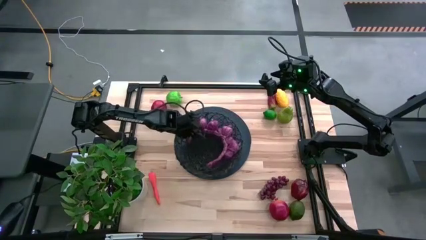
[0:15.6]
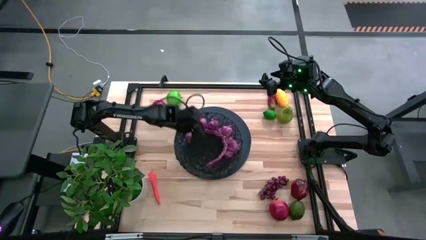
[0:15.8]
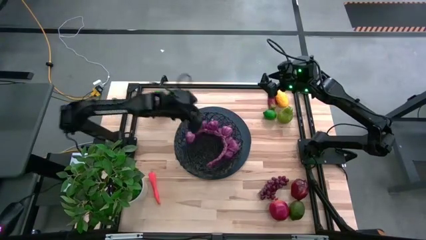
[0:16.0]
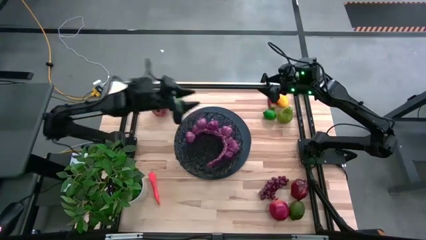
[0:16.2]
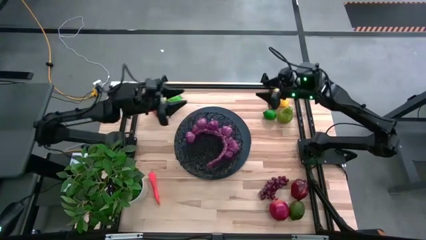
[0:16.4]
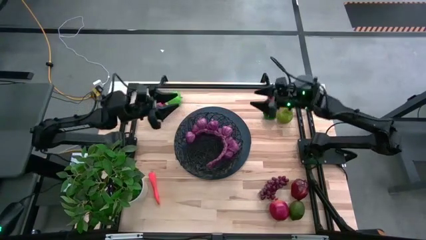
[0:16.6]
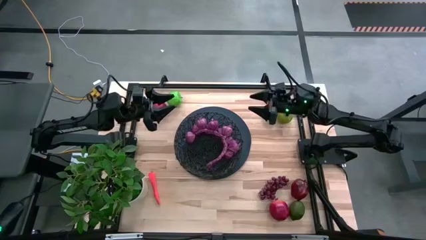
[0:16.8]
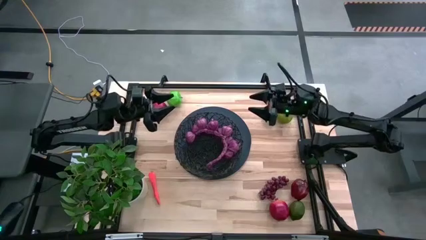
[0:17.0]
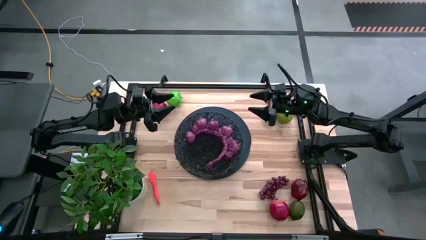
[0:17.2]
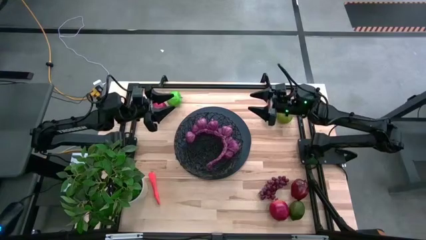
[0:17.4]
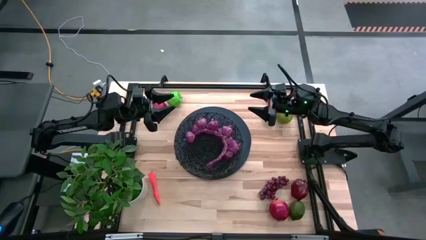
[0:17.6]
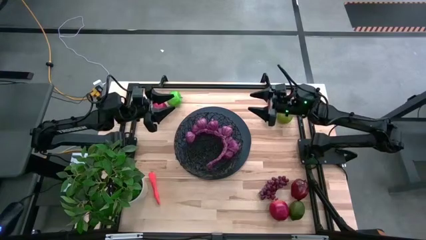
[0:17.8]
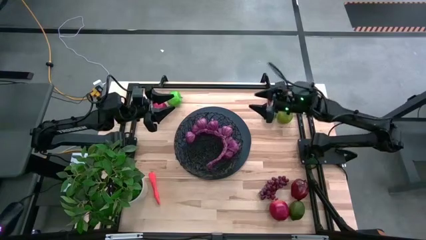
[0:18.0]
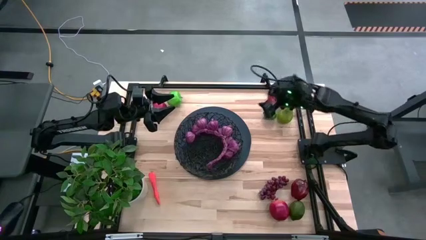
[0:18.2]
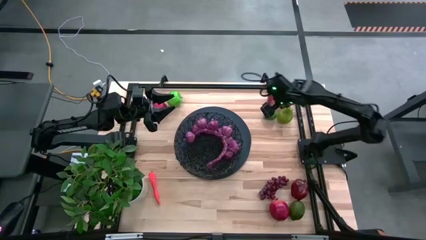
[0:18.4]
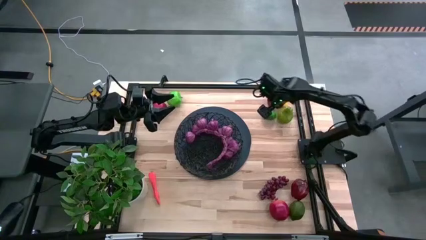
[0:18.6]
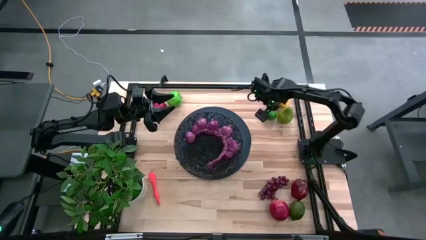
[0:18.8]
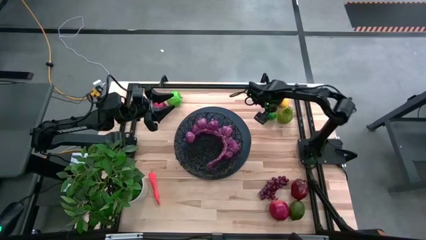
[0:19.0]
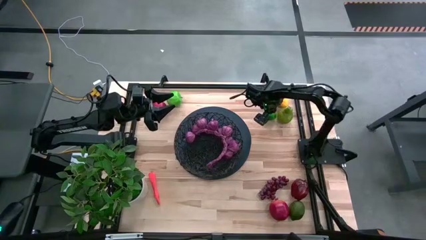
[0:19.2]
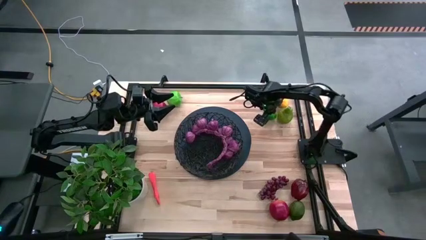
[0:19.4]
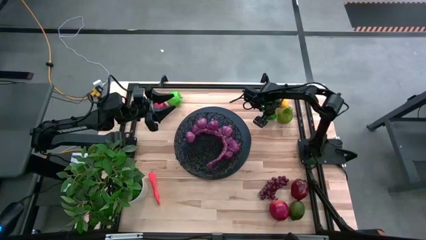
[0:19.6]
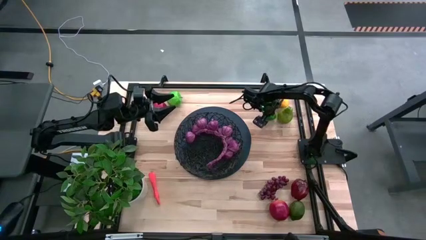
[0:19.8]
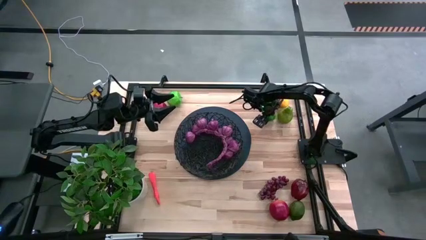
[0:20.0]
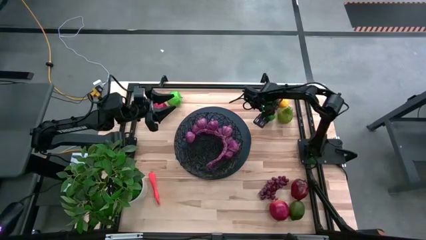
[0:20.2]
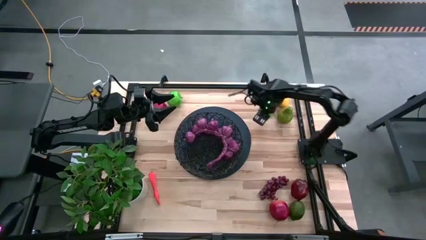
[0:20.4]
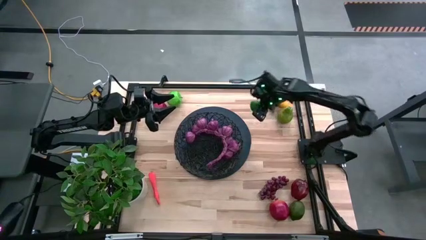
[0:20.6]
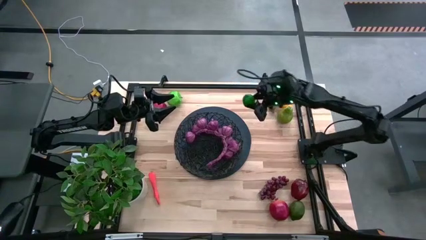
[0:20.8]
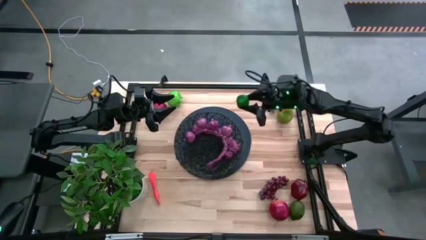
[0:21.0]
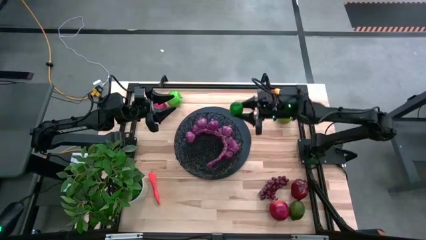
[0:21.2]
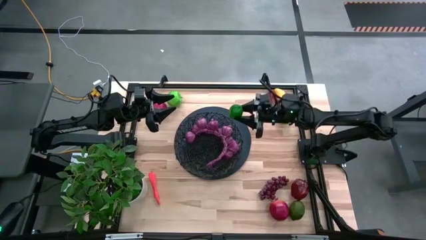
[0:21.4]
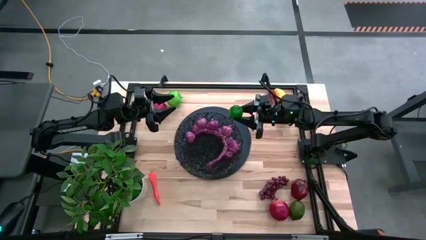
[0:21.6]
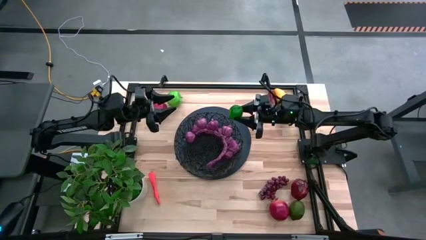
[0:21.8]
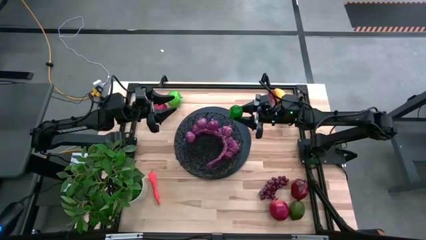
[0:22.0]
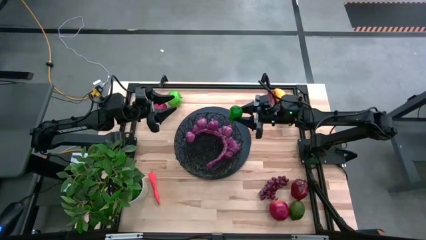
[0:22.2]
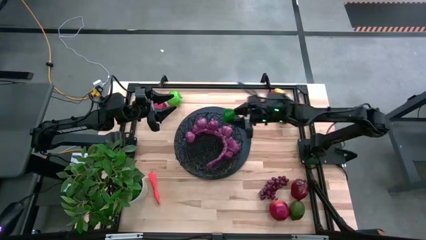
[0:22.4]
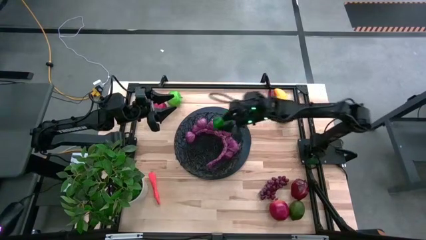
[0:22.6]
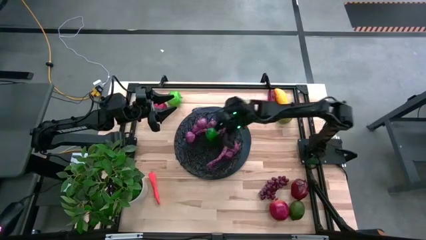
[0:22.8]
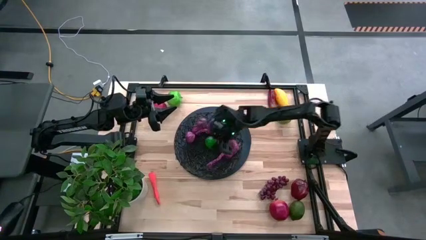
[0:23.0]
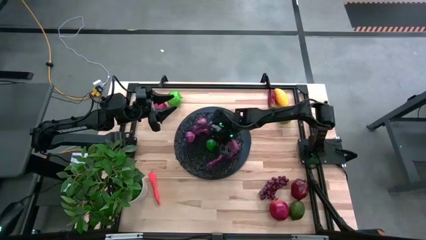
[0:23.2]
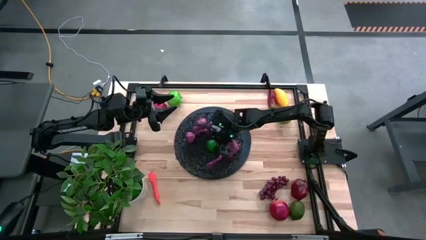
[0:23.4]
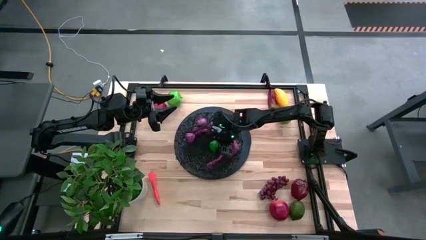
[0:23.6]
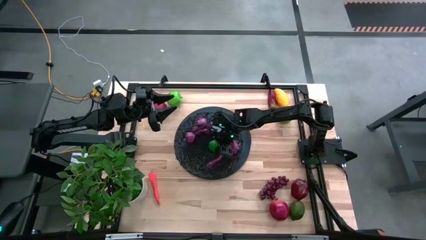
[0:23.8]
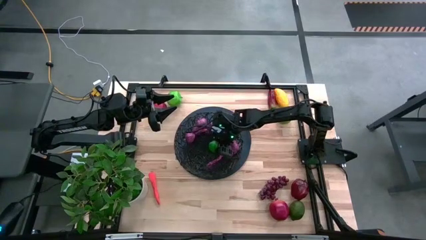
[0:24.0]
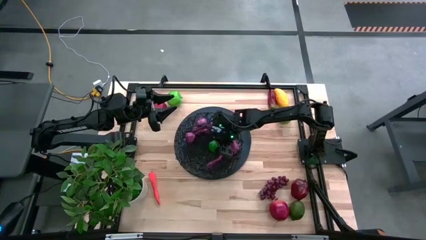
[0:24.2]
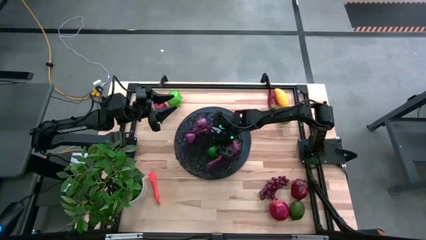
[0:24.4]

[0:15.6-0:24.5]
Task: Build produce basket
Put the top green lime into basket

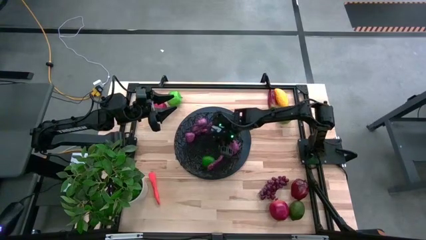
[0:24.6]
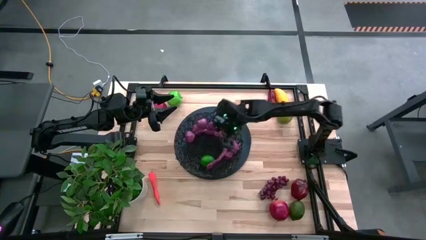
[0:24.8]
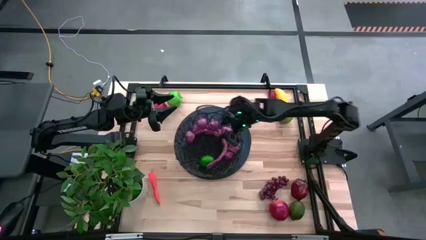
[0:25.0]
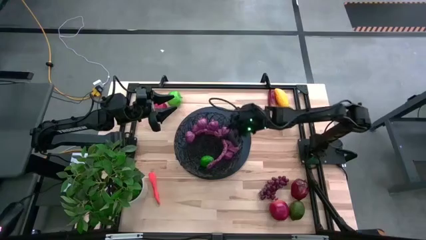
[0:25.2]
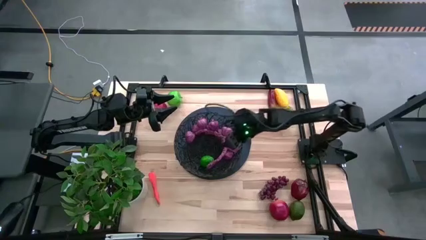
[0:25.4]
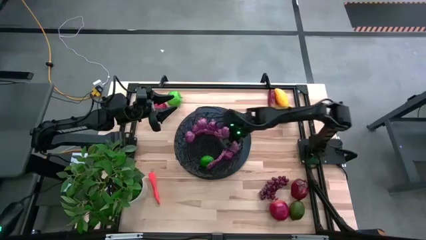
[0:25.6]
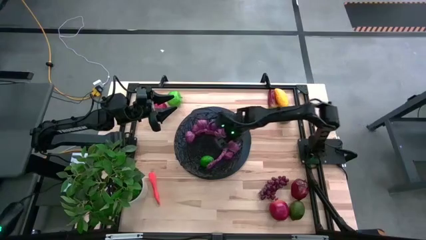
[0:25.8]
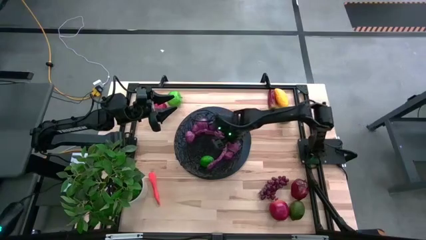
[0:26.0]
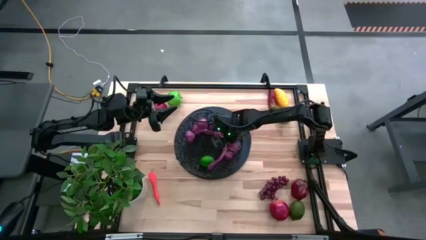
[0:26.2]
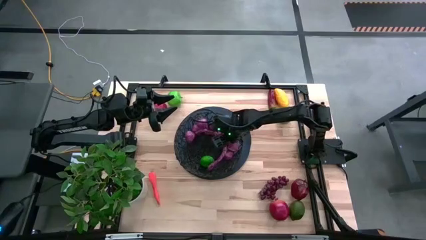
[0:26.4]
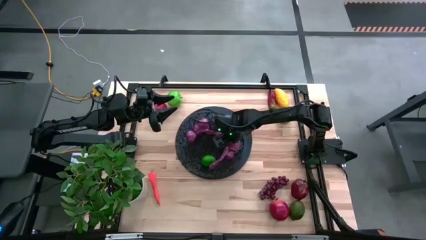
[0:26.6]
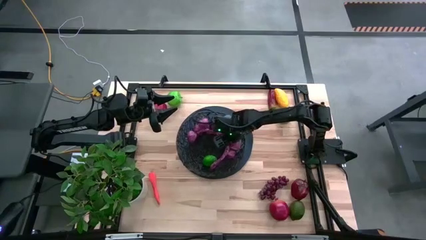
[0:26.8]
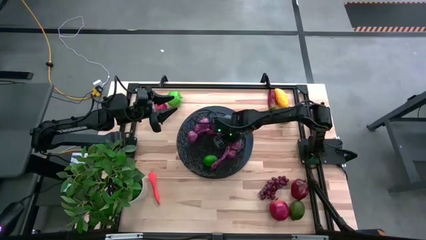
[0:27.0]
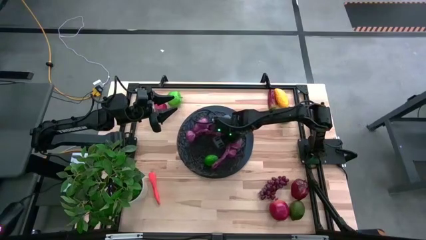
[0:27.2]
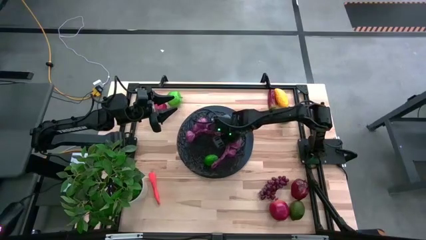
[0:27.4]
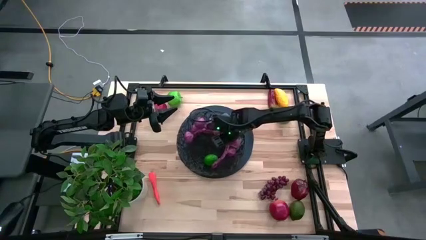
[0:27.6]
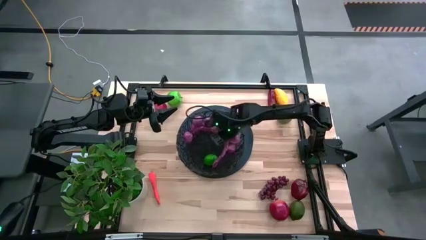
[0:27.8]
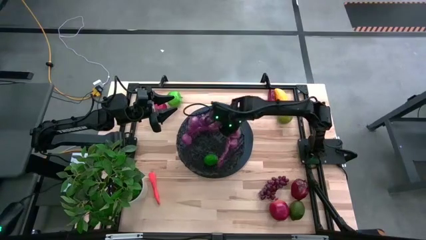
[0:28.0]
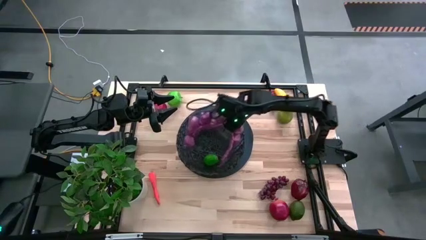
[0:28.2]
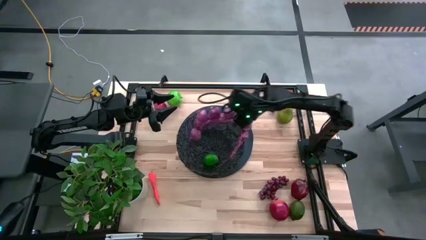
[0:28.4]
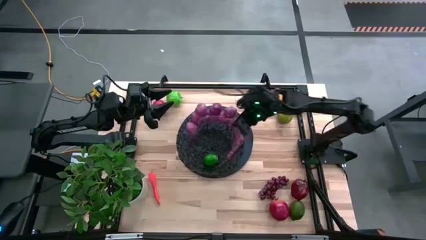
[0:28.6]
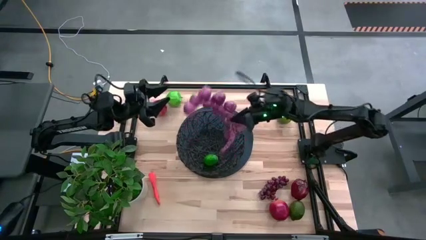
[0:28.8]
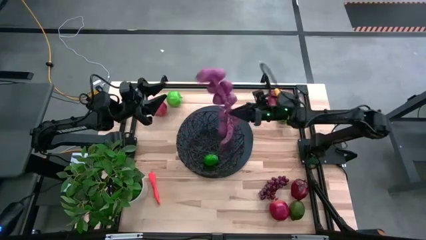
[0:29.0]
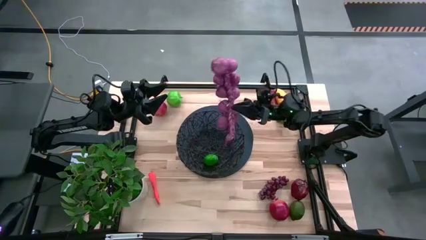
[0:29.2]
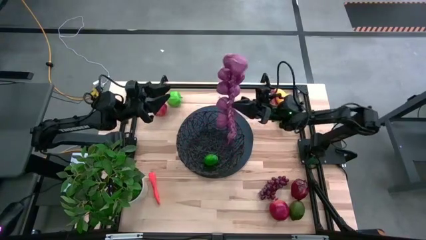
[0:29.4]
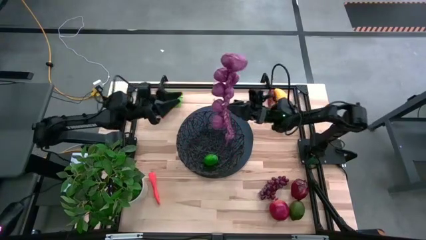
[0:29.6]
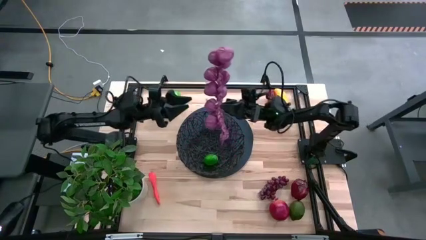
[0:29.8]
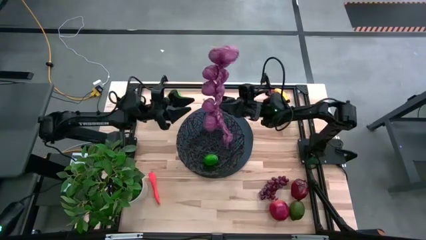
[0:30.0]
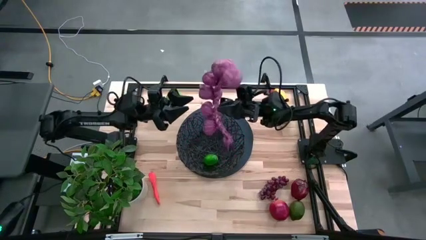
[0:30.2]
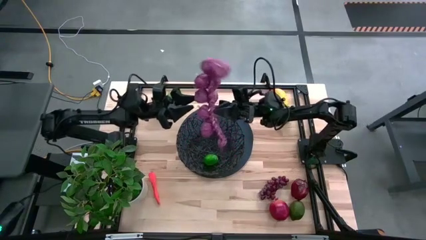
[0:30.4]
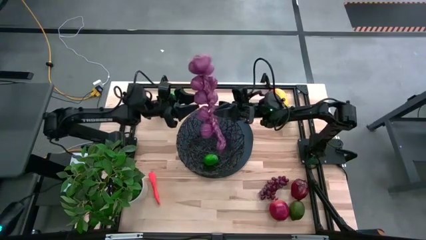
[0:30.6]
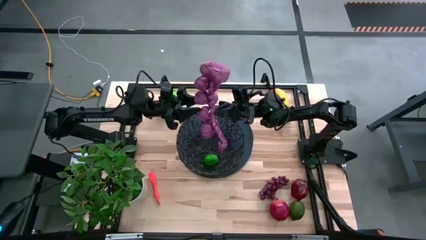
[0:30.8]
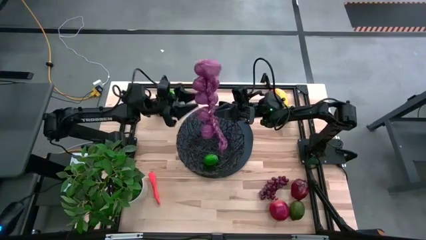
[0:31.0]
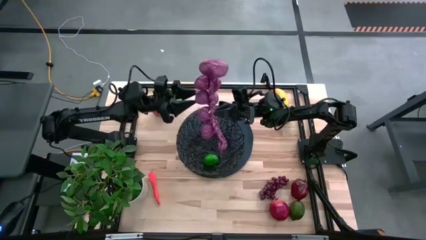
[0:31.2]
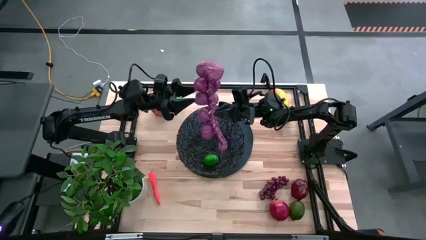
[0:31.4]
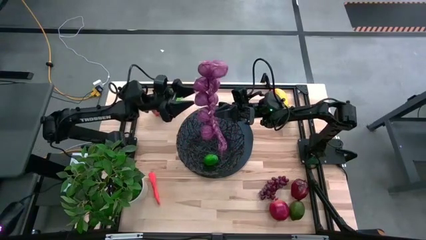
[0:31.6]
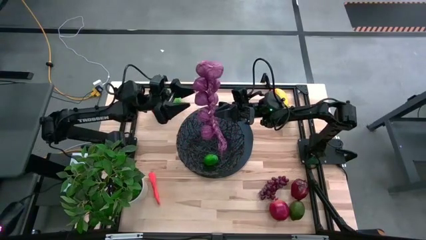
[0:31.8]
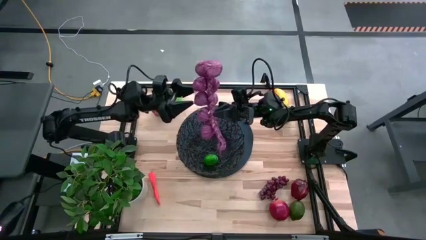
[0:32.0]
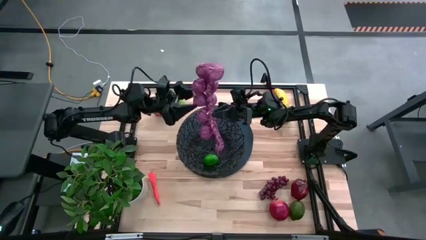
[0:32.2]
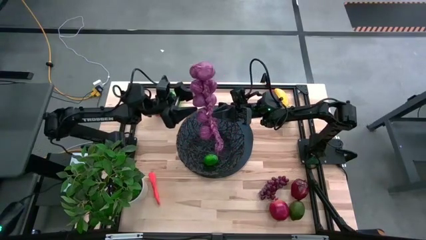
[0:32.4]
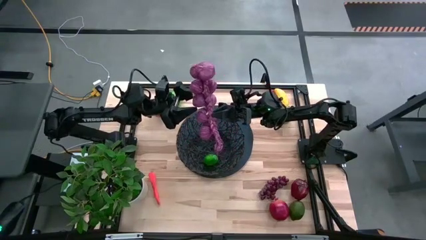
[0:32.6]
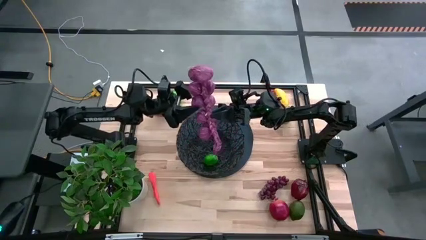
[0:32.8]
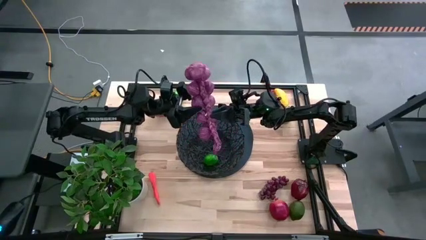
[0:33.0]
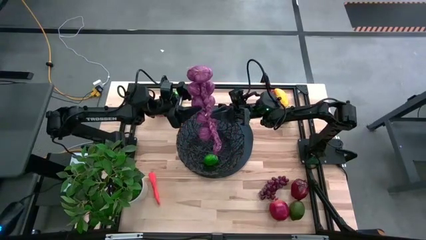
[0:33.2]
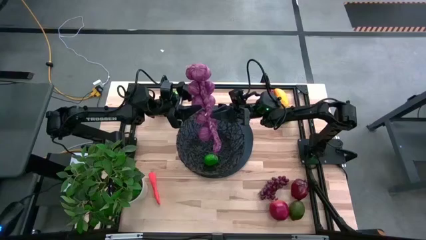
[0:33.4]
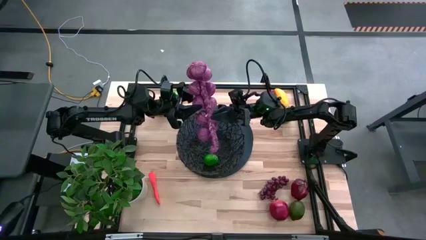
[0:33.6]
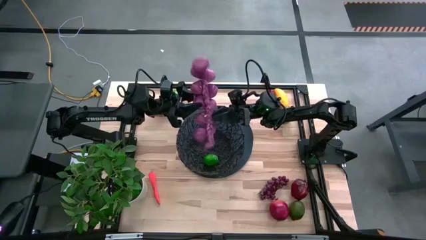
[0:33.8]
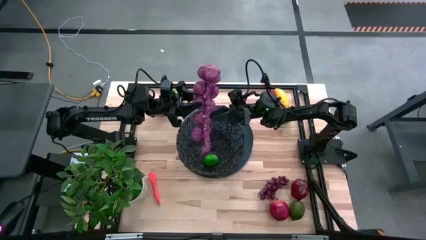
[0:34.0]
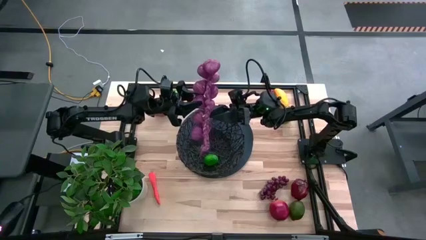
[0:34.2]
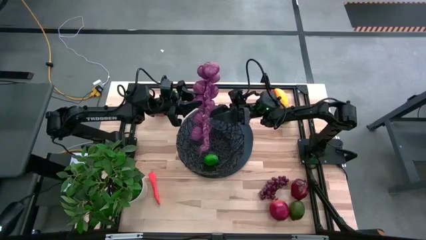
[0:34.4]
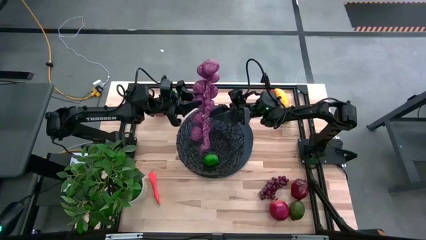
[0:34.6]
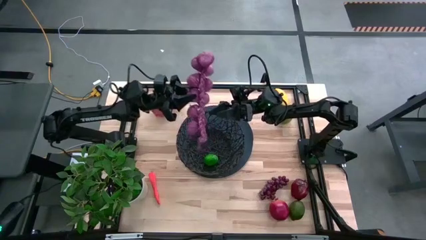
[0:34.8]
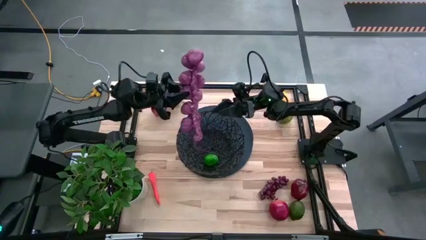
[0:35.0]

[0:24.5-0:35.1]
Adjust the purple garlic into basket
